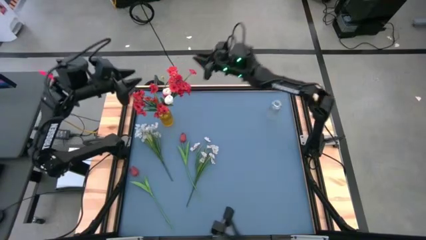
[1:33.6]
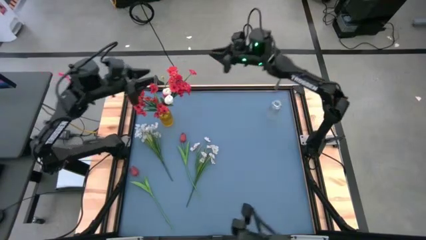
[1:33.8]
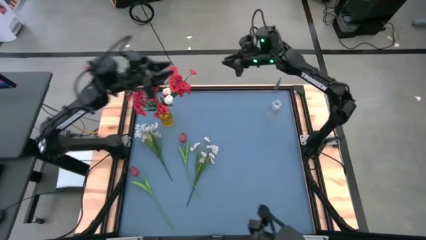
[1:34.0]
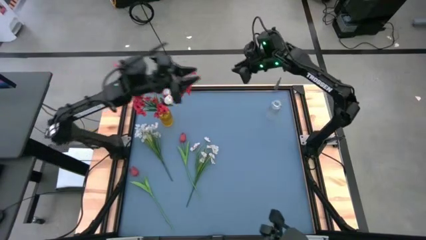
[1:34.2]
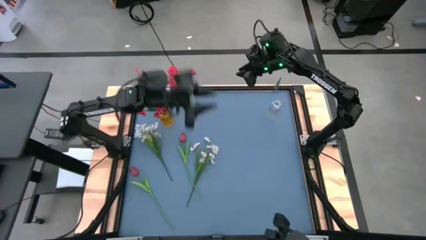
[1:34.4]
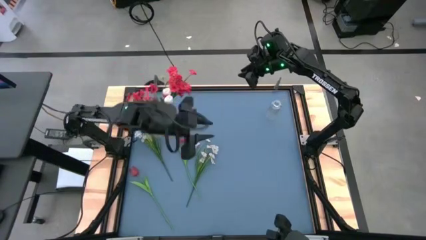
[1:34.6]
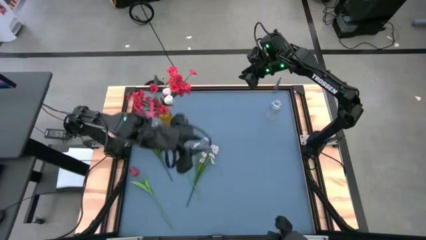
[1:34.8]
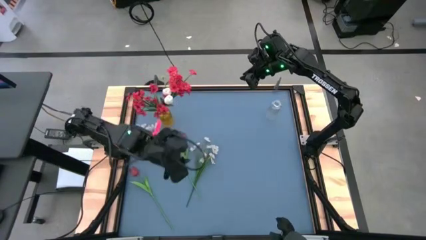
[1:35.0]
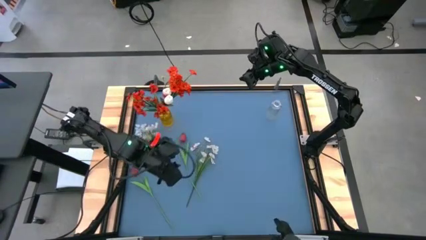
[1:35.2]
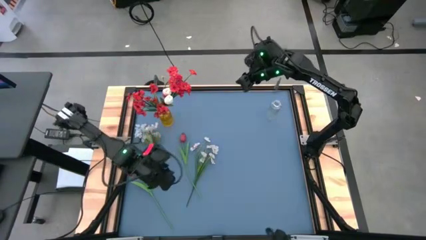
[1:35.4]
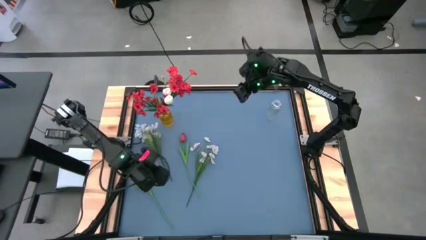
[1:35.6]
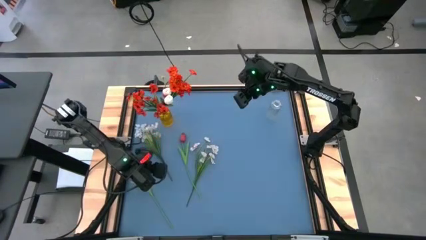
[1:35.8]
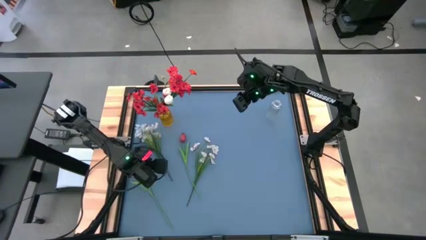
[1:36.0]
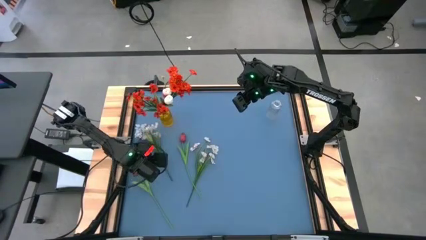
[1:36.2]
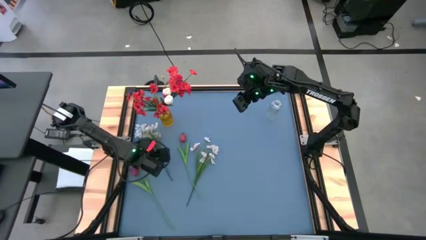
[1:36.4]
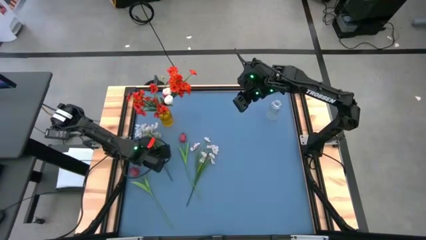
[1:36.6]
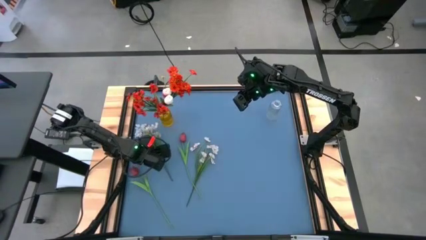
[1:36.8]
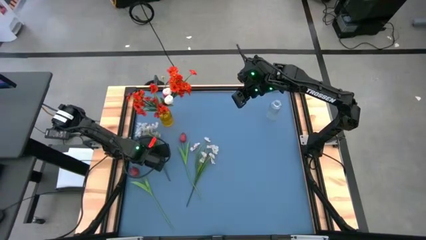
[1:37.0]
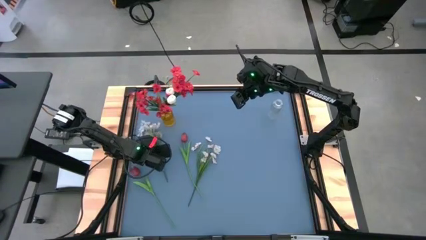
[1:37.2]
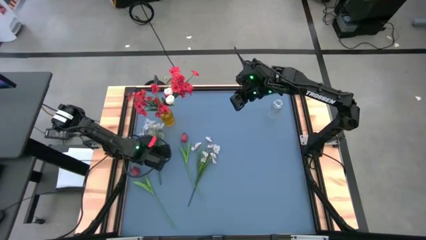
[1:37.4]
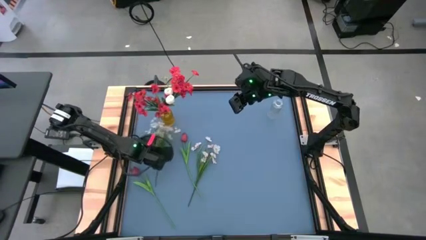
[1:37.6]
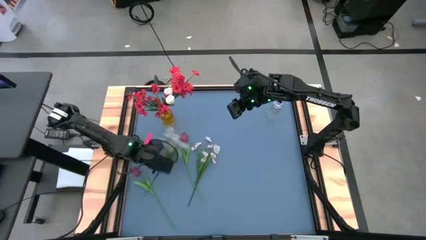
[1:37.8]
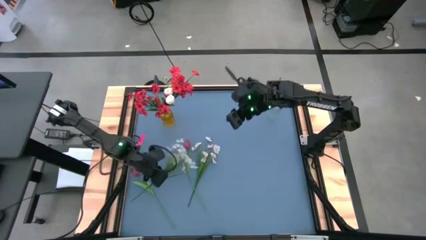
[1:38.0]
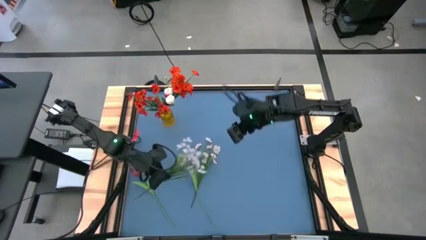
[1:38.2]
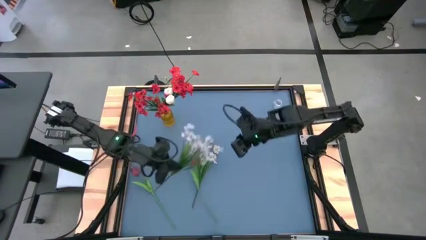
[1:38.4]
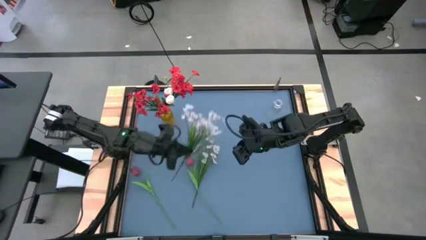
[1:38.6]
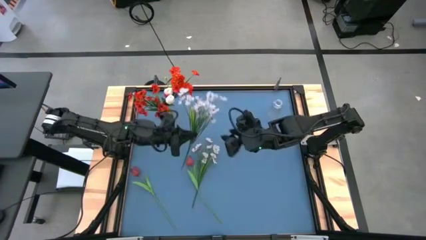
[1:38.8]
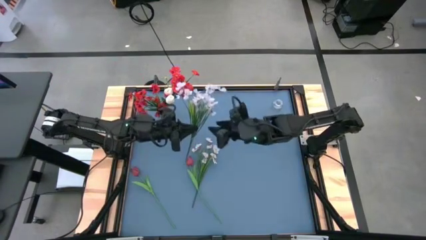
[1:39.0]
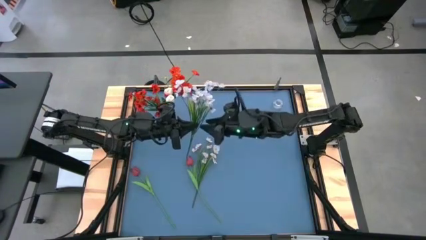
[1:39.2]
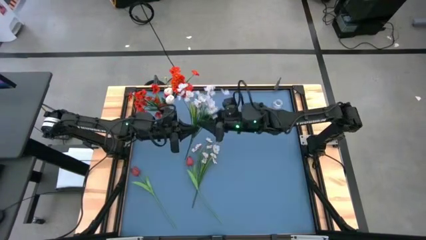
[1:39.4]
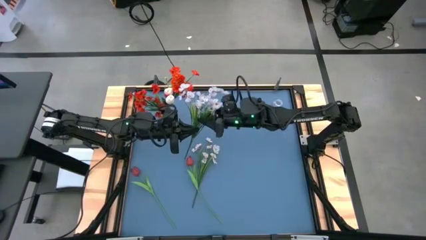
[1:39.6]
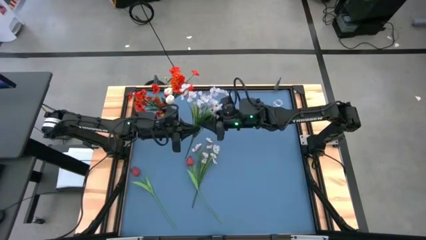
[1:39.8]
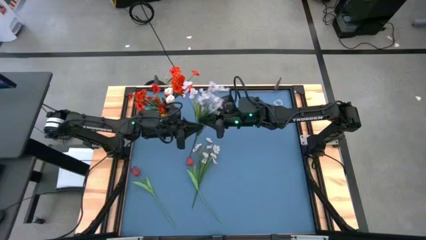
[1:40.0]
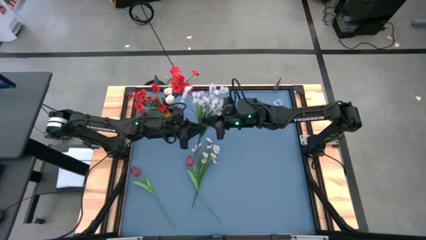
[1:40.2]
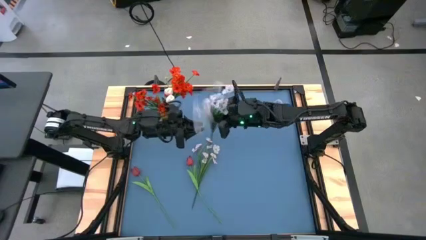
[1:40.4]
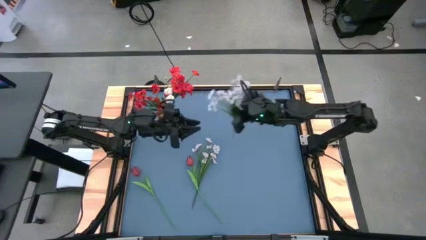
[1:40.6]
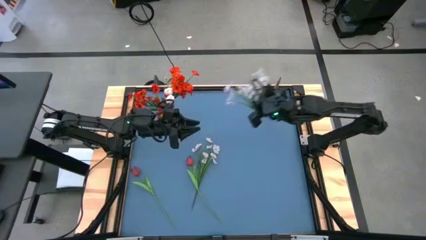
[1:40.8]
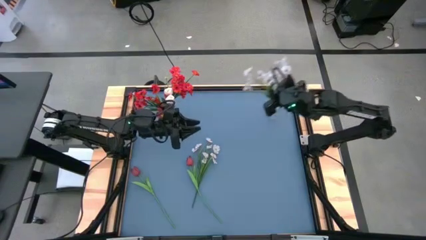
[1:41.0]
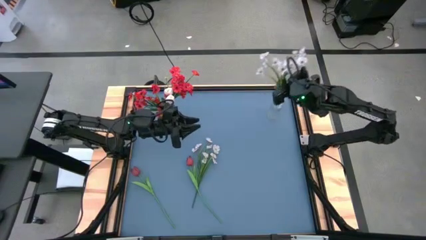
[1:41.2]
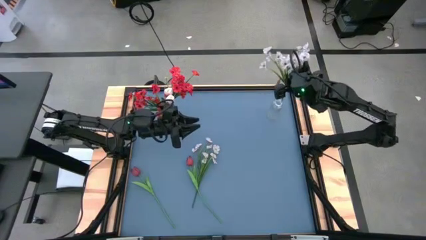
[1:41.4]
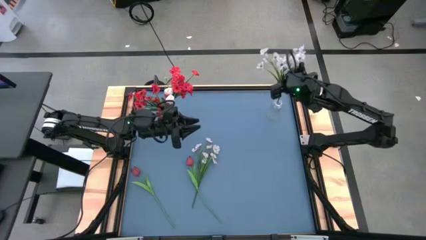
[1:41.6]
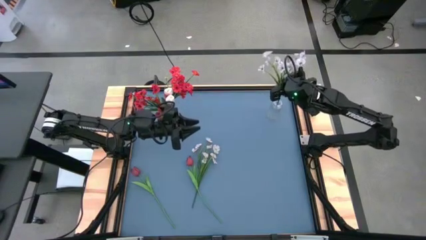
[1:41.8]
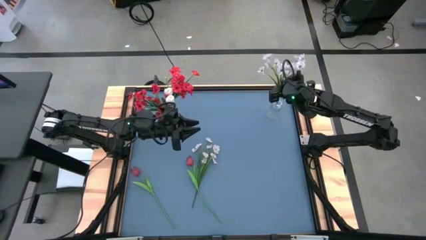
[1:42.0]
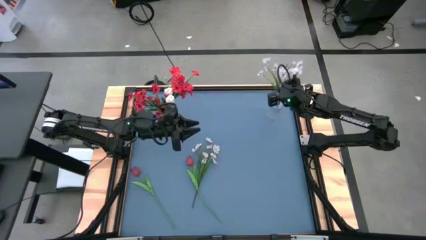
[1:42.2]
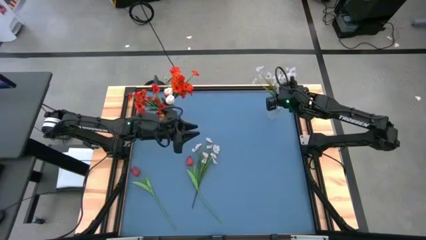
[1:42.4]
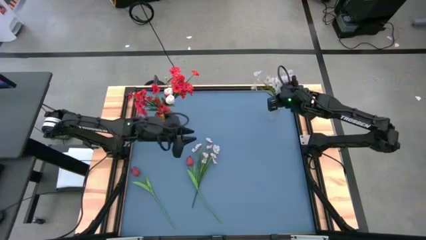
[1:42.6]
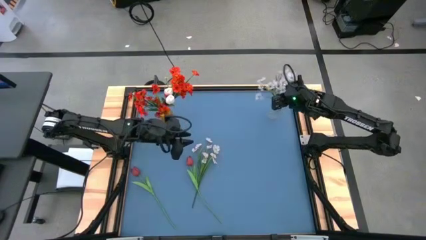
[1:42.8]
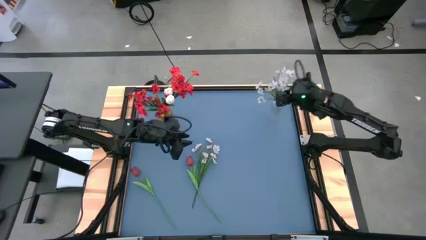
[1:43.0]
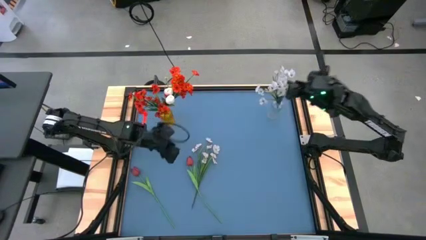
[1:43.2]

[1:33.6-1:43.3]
Task: Sort flowers into vase by color
Put the left white flowers into the transparent flower vase

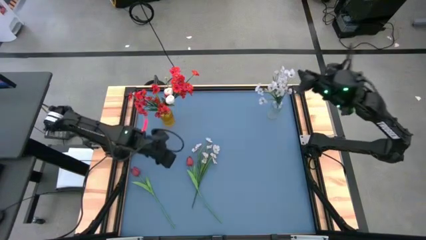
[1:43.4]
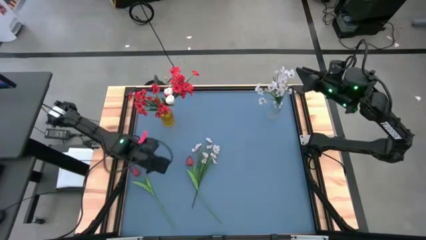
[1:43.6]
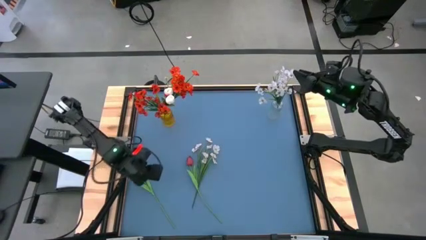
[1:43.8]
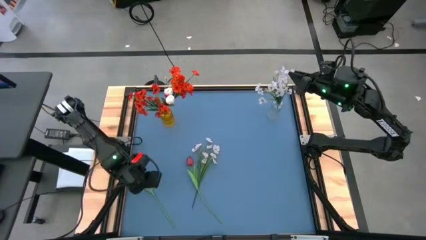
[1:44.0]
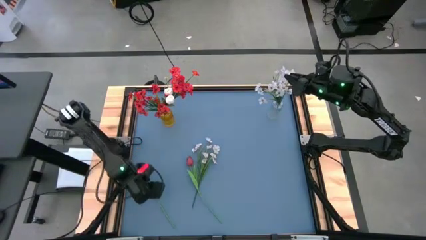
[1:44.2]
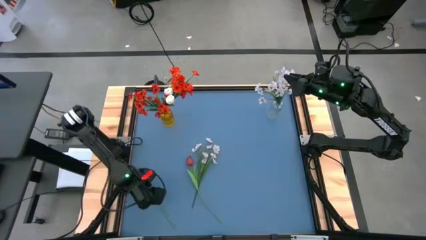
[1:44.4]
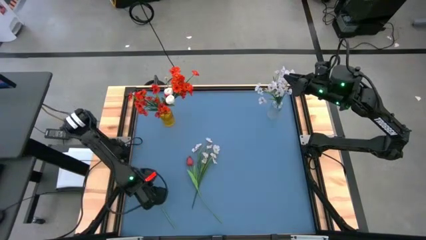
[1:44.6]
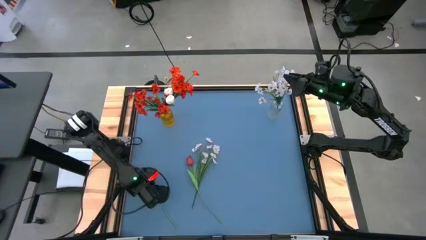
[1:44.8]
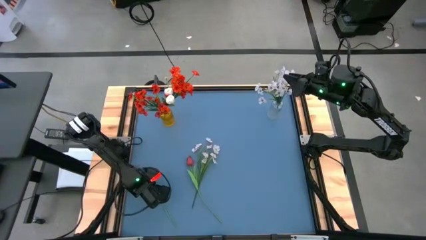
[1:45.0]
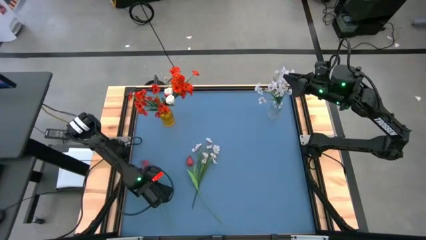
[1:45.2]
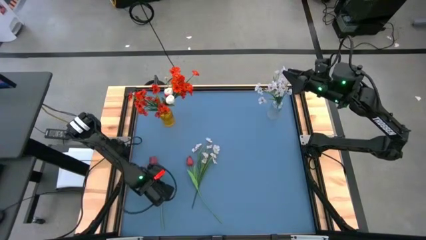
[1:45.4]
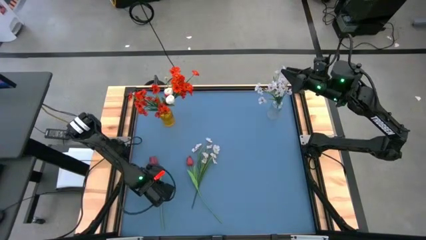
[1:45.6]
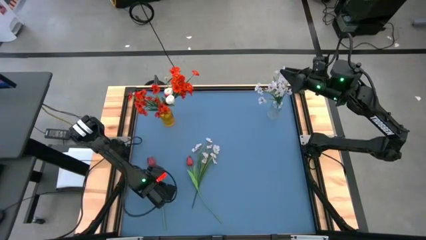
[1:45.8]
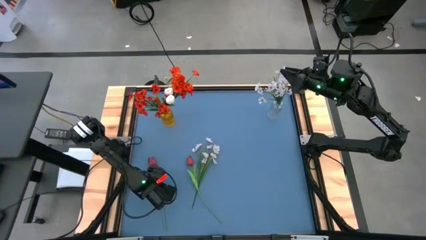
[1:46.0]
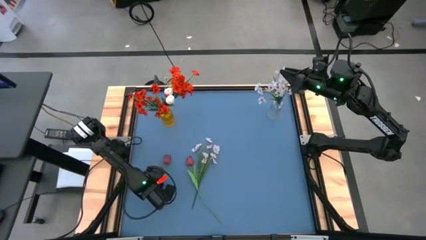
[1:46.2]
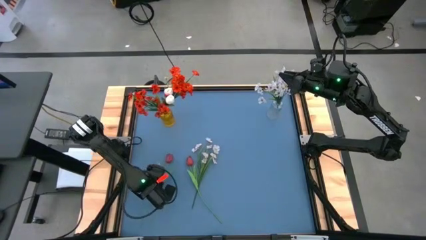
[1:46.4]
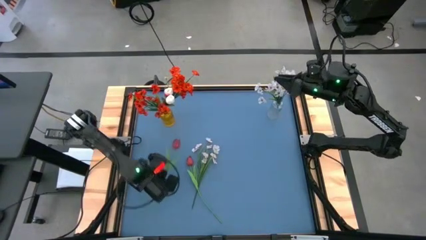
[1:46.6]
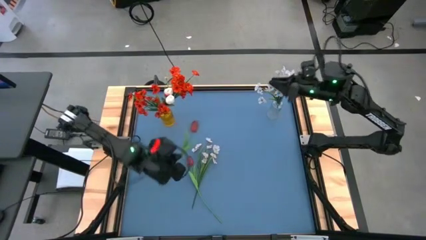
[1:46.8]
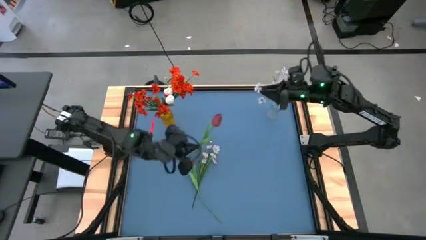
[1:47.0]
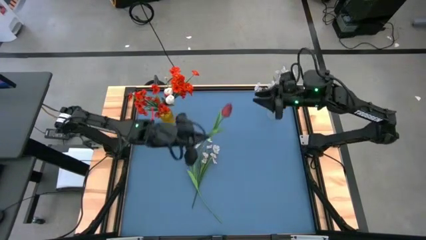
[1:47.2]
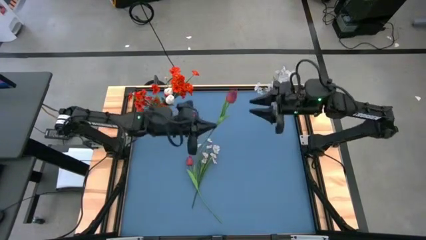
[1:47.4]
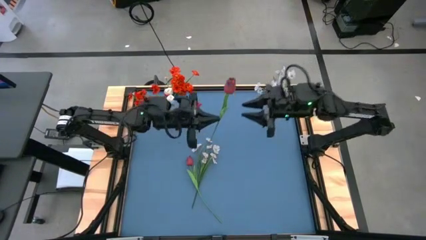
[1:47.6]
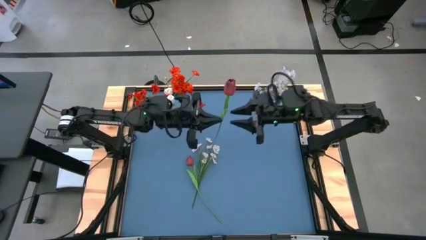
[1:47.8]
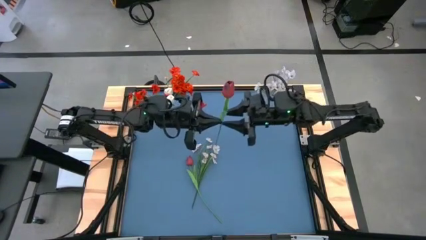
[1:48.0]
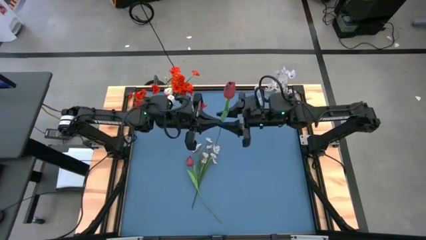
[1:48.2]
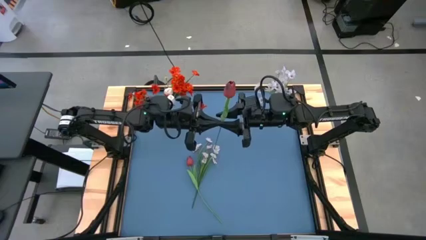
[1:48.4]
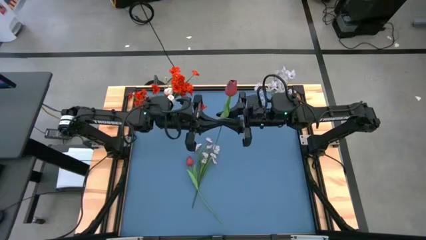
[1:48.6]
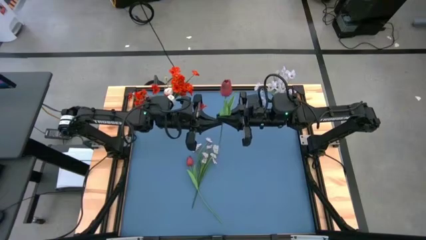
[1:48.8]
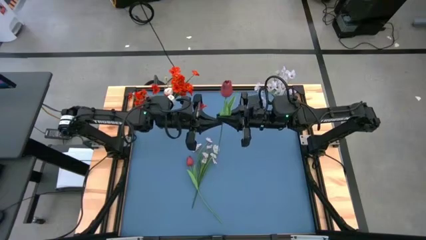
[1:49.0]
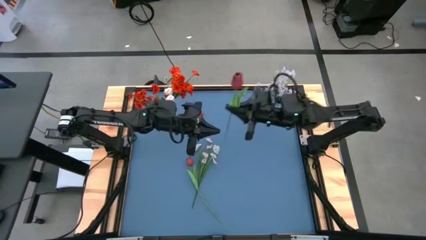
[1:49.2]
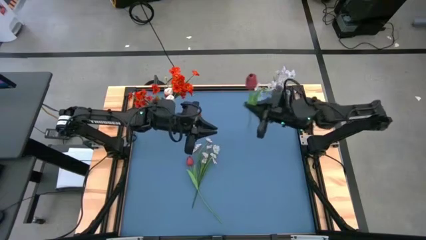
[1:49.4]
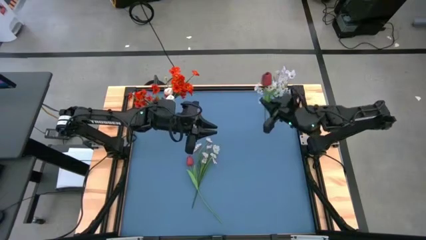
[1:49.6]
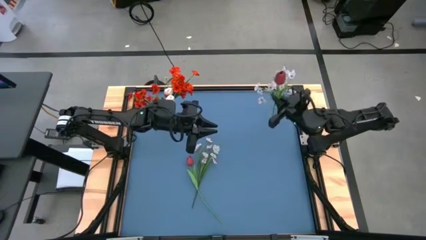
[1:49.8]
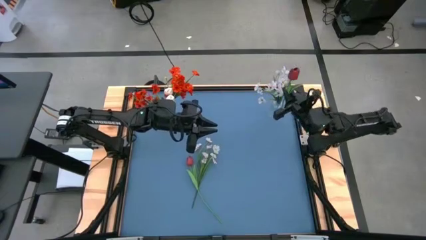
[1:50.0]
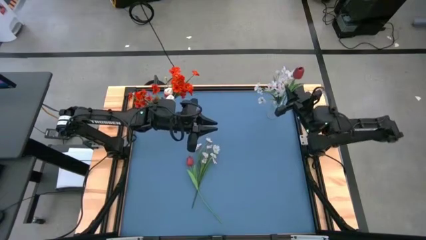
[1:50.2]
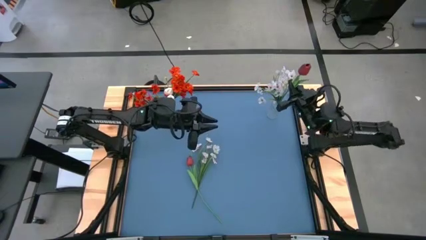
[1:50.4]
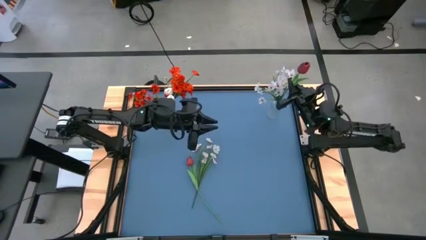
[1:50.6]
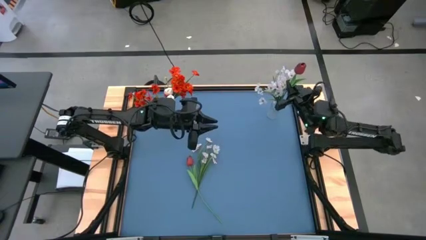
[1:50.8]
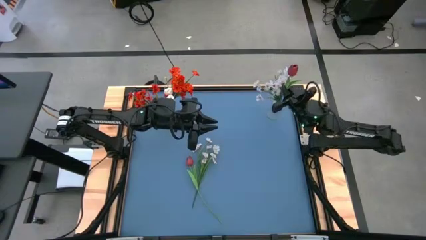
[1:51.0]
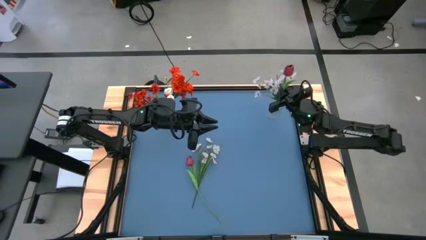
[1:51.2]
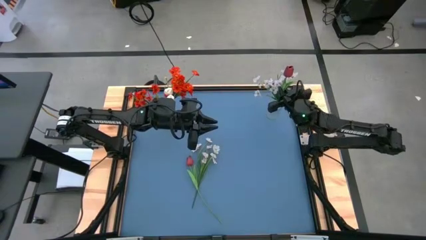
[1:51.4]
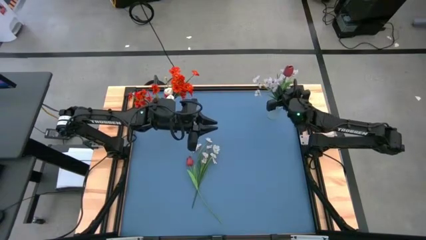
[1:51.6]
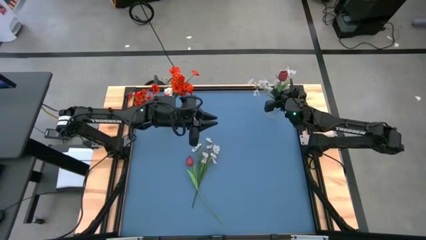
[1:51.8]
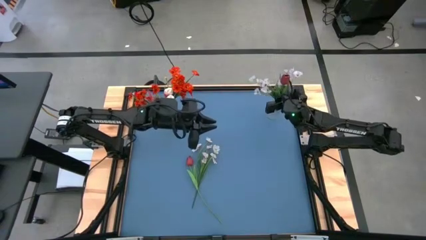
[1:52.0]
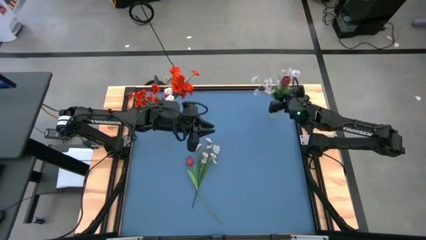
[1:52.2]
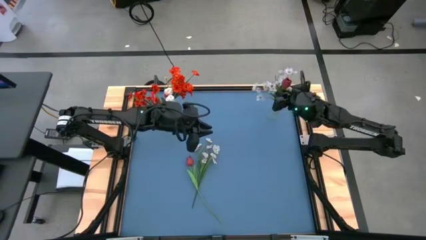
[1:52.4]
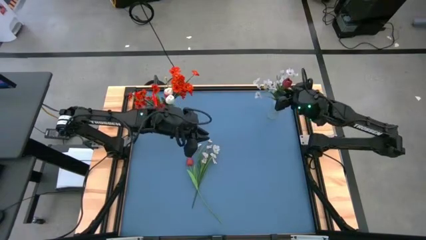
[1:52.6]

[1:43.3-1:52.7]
Put the left red flowers into the transparent flower vase
